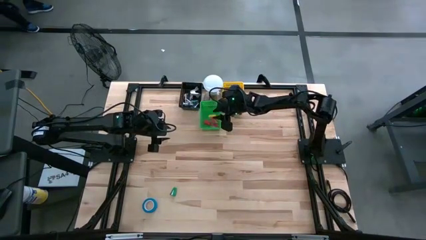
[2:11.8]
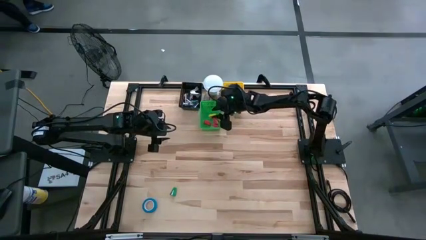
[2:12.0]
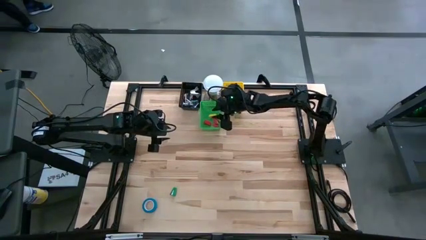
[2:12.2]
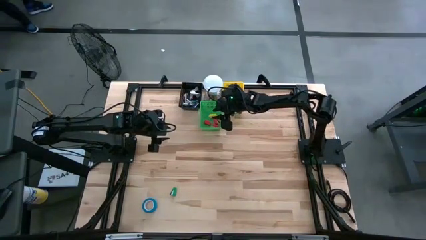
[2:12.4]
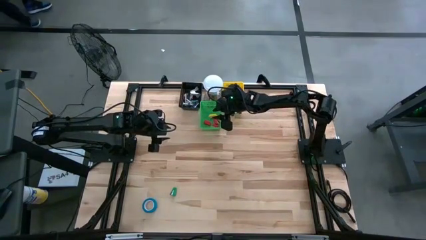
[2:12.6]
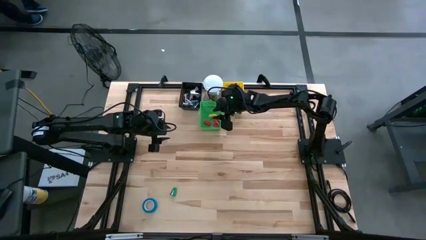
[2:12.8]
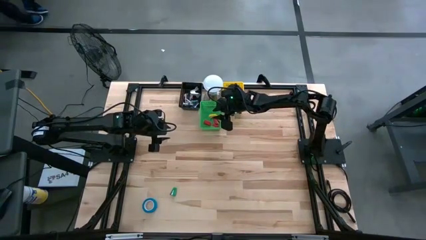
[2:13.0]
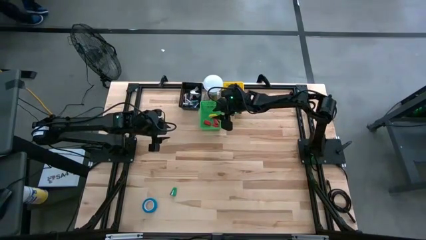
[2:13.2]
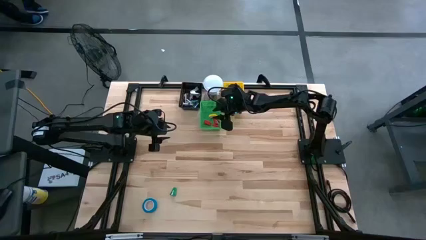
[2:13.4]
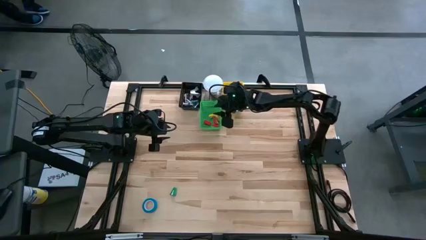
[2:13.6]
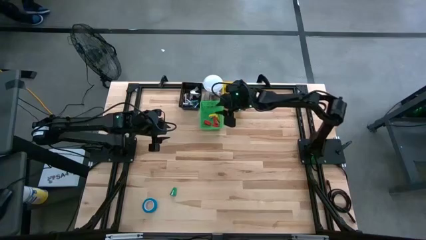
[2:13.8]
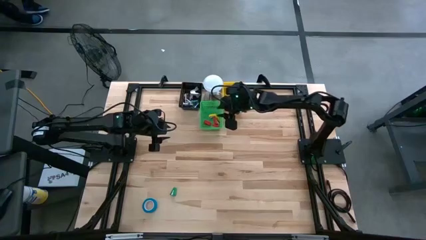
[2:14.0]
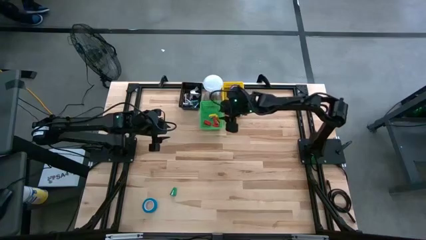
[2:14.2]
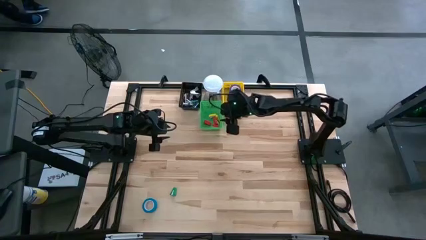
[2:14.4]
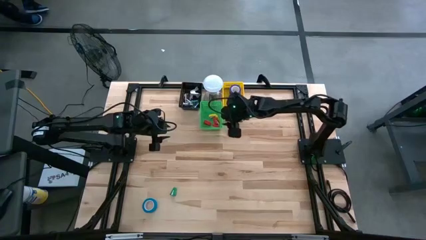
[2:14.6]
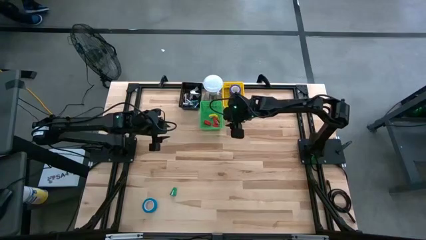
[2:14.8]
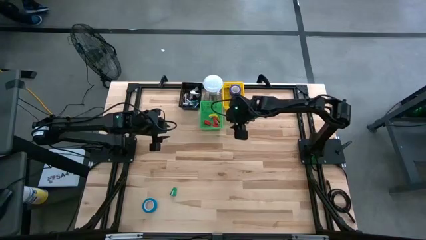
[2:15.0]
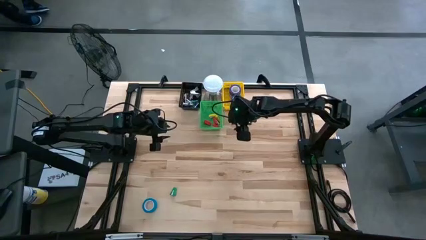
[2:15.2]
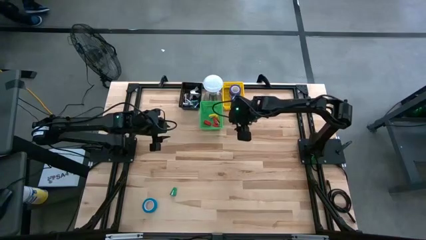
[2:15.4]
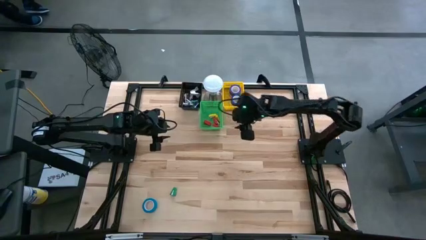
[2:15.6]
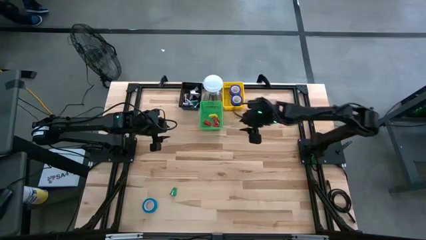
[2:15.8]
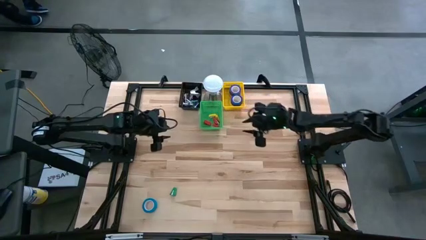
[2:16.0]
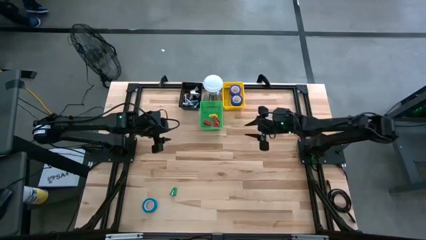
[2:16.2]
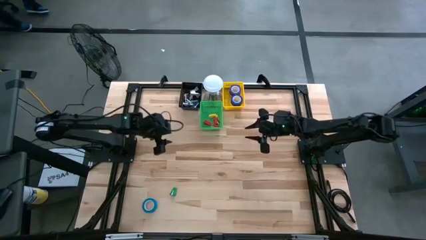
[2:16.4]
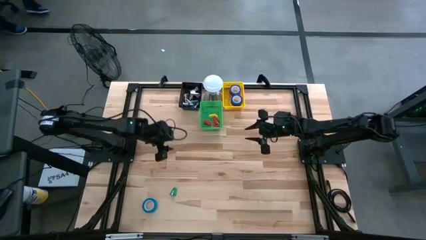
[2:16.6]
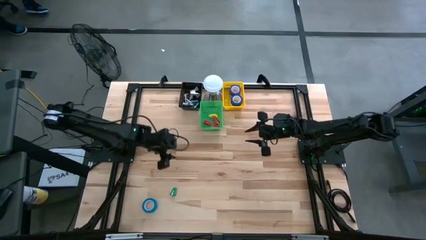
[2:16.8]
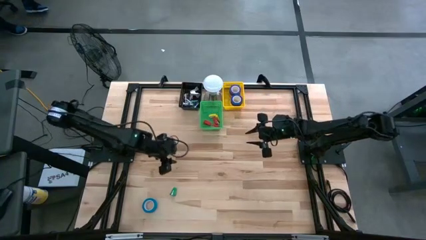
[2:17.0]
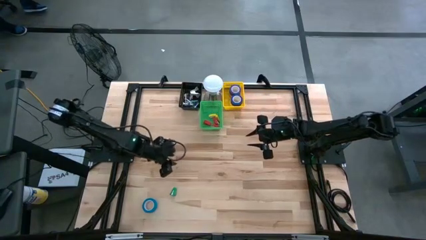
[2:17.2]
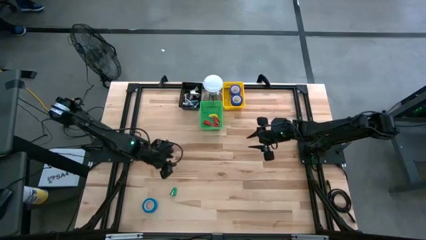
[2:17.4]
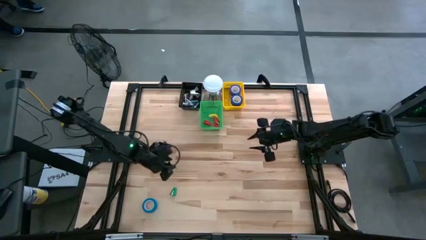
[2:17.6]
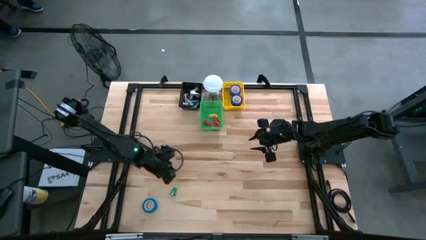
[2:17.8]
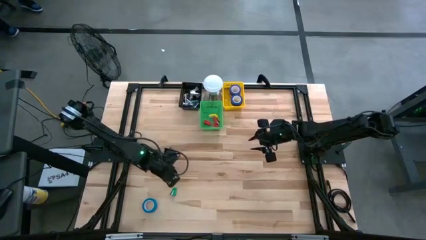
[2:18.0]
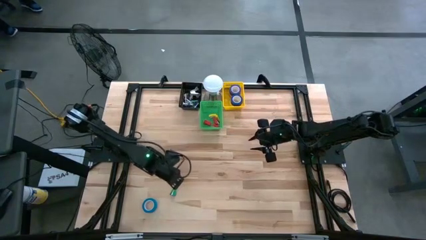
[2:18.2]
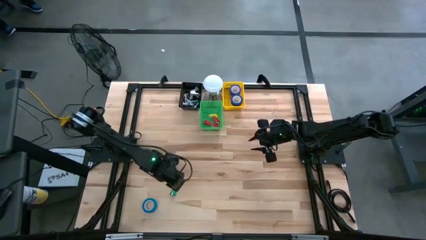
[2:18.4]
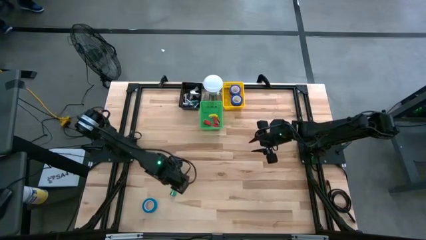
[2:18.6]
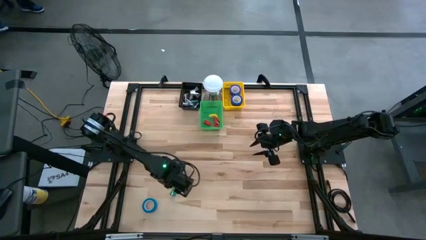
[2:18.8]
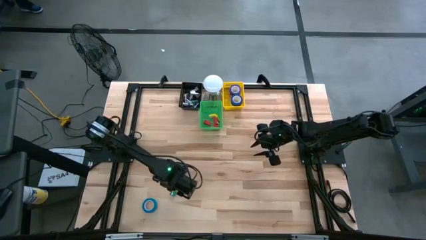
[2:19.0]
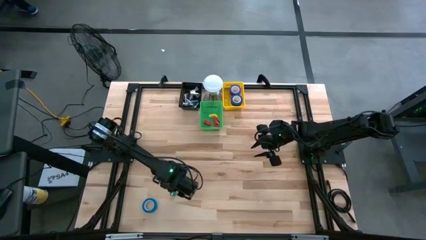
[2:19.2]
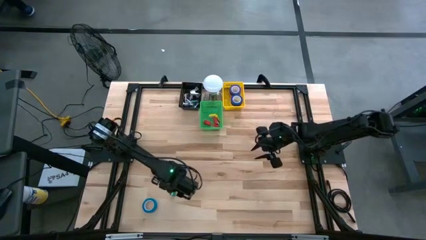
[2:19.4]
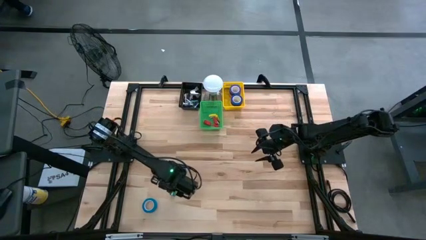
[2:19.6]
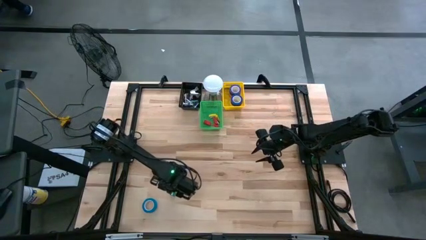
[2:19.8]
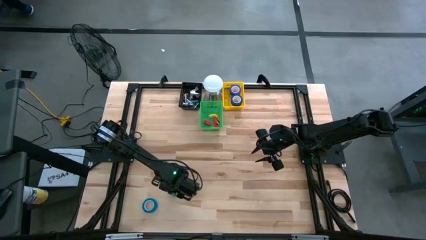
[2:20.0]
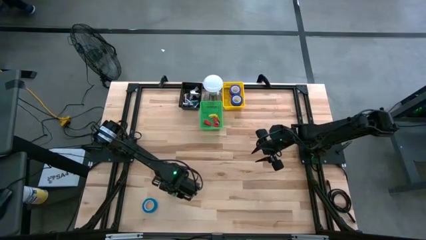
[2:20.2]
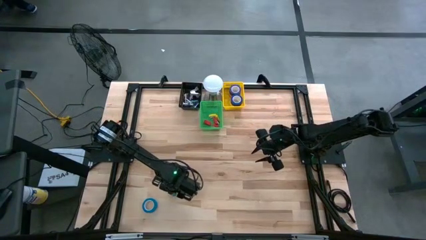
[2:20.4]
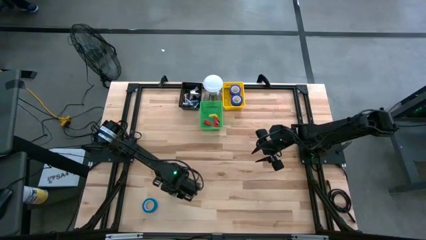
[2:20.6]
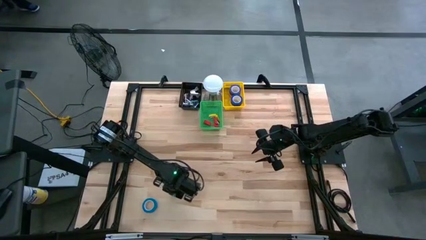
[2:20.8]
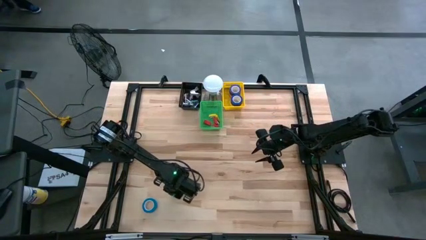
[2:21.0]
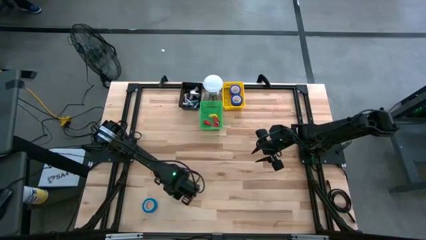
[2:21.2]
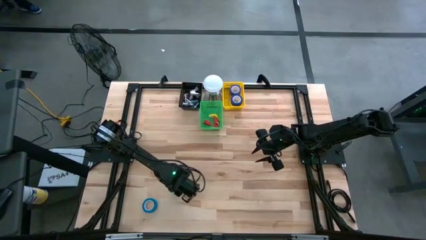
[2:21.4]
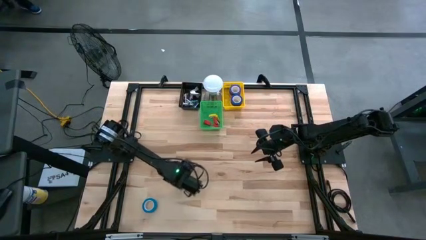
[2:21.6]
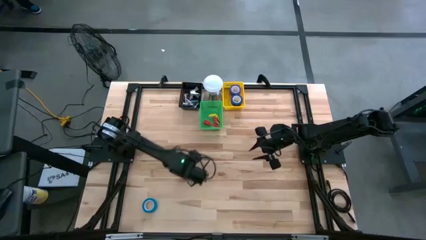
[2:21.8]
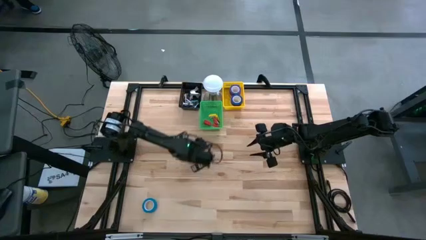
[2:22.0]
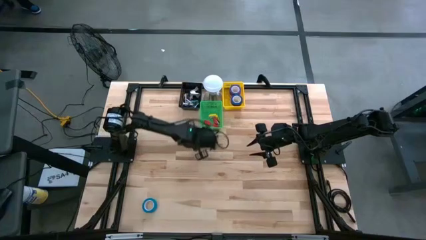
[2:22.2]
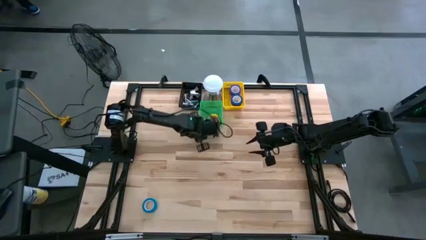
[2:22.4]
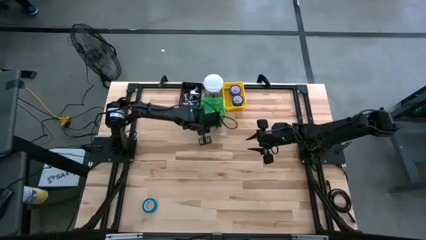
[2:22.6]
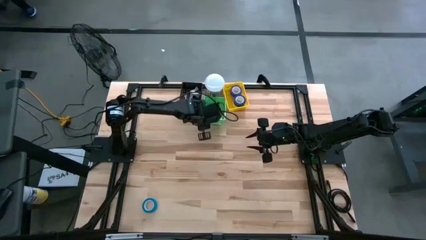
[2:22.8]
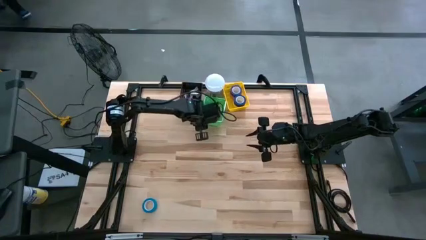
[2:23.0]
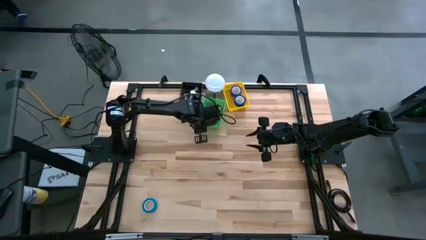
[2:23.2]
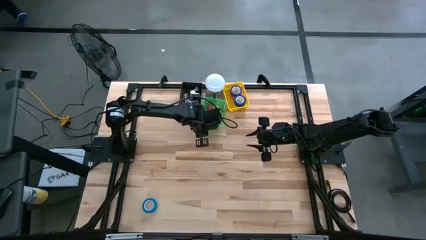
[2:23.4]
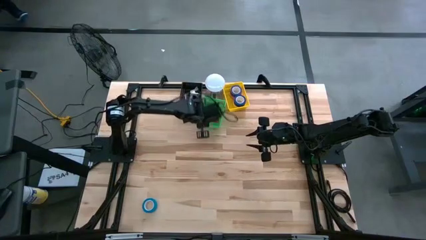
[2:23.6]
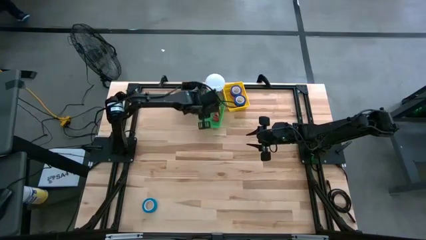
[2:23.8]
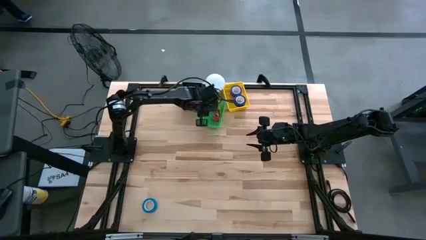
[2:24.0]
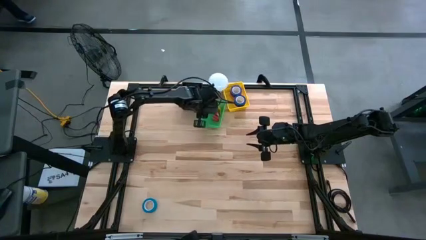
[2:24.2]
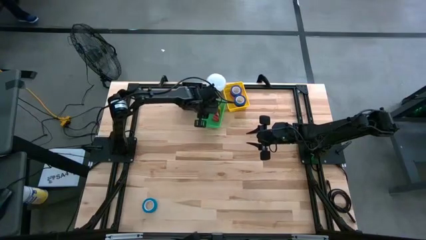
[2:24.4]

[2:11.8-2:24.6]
Task: Pick and place Stapler, Stapler remover, tape
Put the green stapler into the green bin

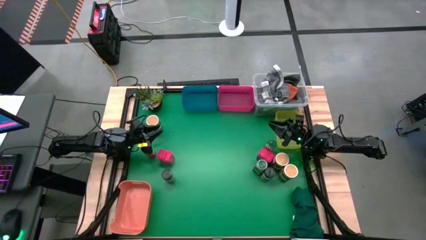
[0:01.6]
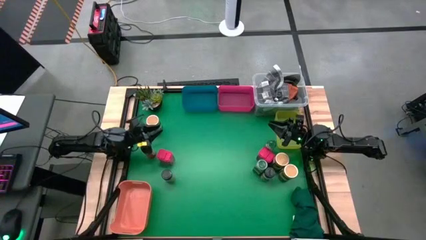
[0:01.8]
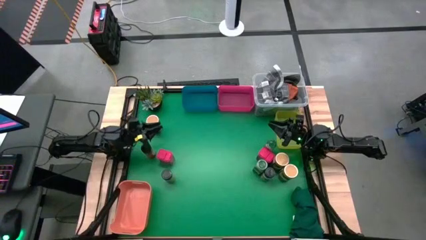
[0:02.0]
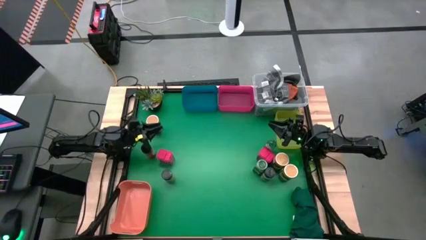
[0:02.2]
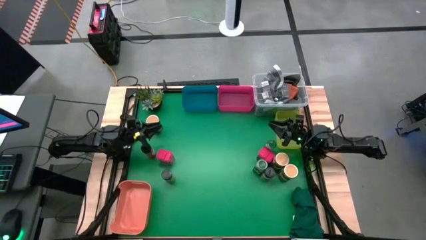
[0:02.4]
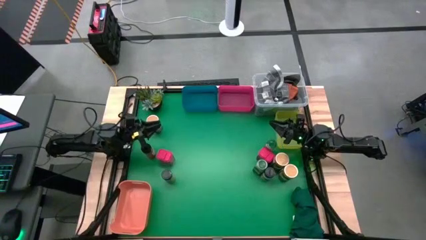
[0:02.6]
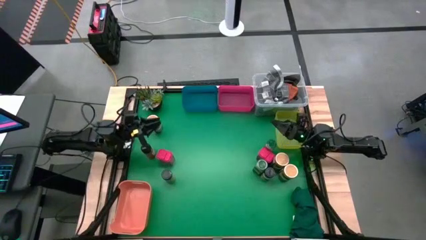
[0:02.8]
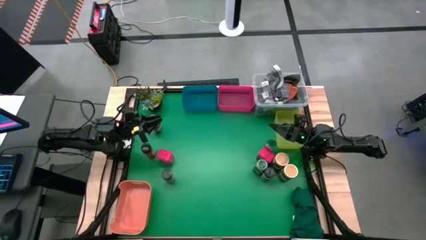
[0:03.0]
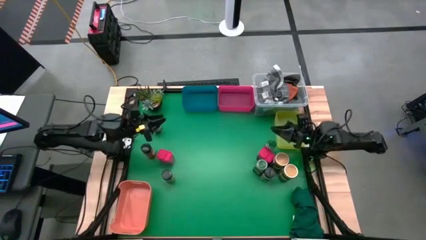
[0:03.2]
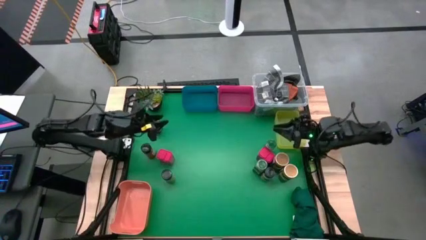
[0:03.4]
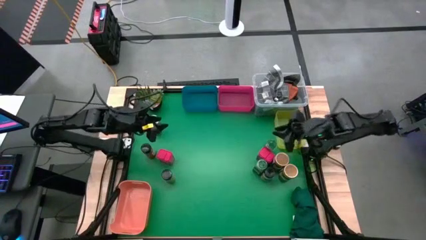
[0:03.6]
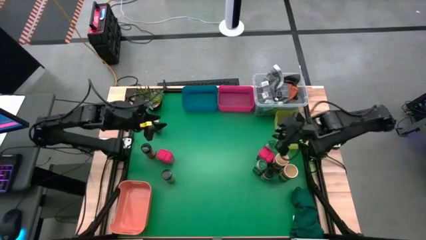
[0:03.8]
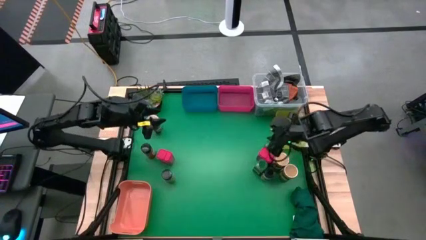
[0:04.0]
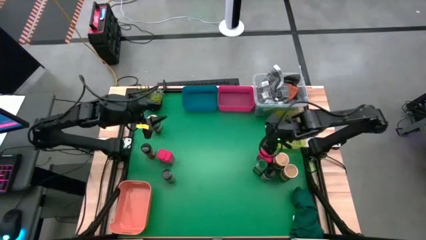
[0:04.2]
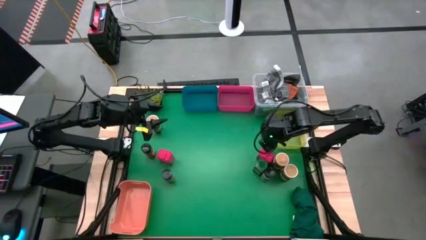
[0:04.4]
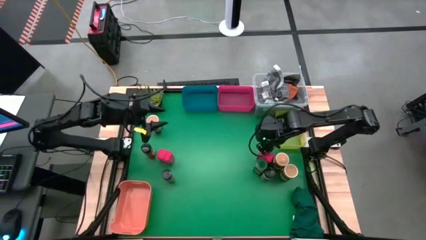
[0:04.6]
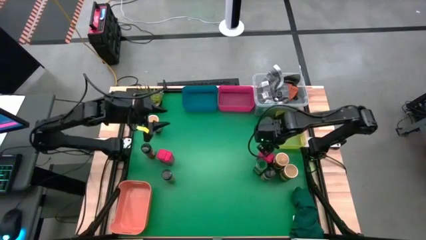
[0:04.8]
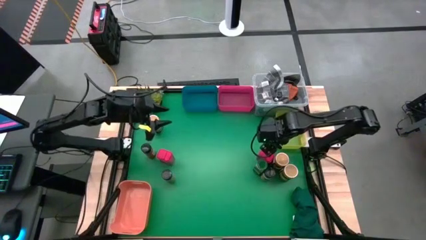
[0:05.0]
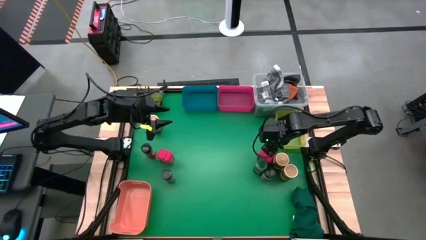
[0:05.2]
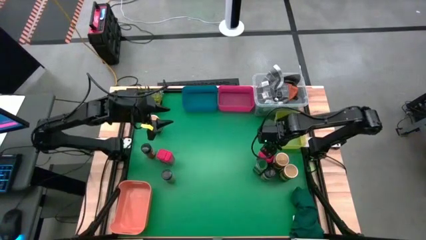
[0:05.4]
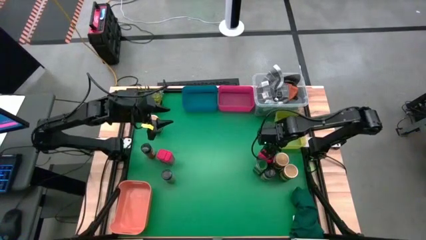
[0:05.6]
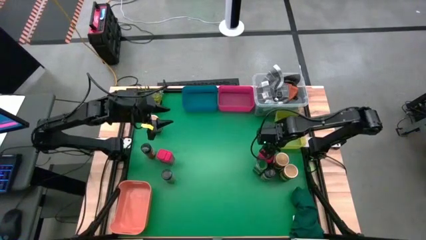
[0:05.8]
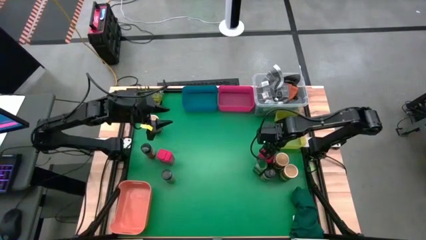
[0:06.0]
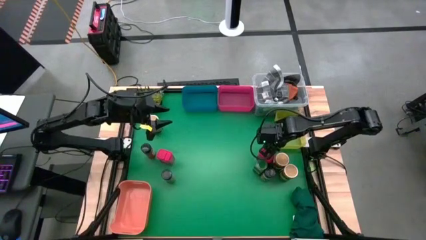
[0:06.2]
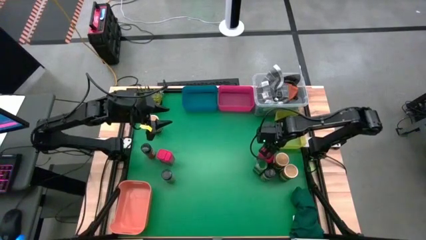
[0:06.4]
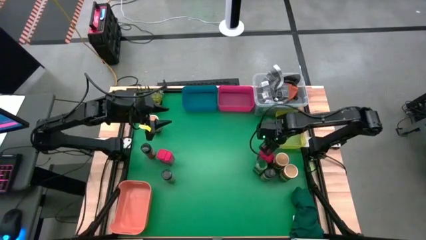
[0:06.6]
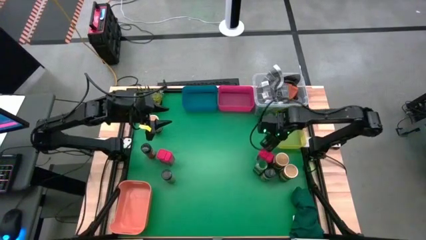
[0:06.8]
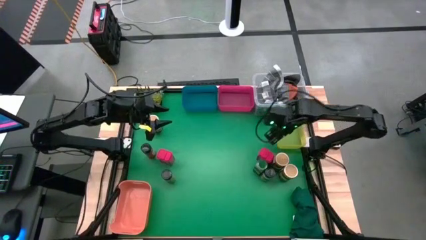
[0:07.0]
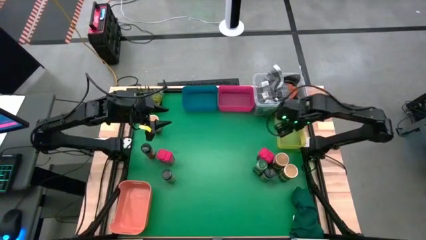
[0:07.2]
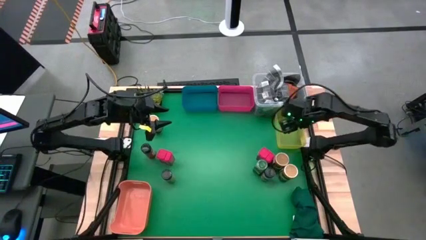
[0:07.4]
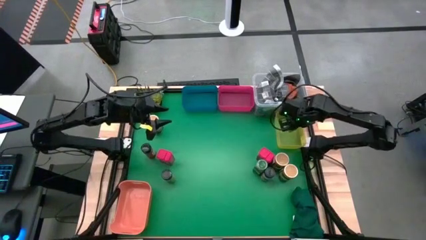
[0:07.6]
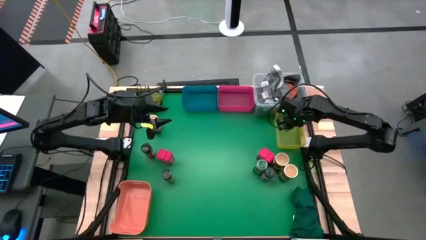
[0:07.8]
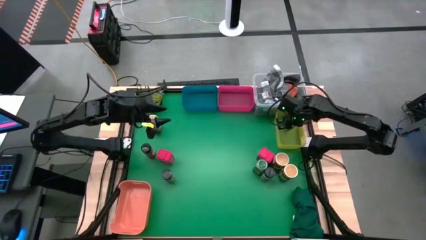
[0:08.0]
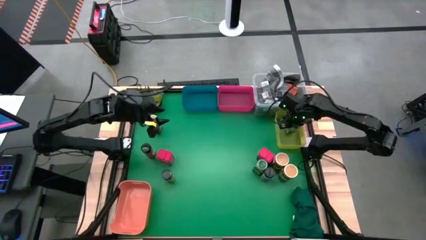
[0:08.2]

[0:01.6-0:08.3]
Task: Sort spices by type
Put the top dark green spice bottle into the yellow bin
